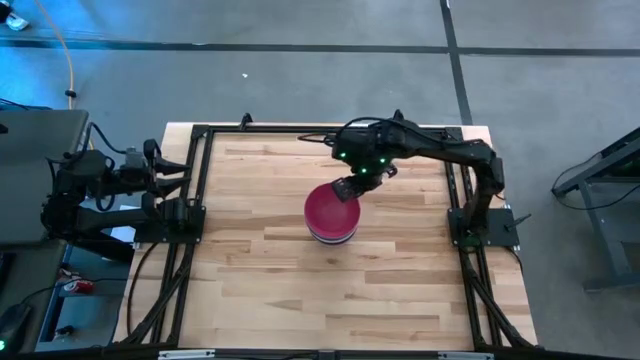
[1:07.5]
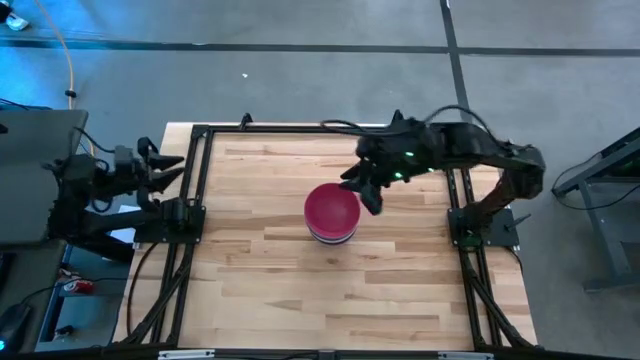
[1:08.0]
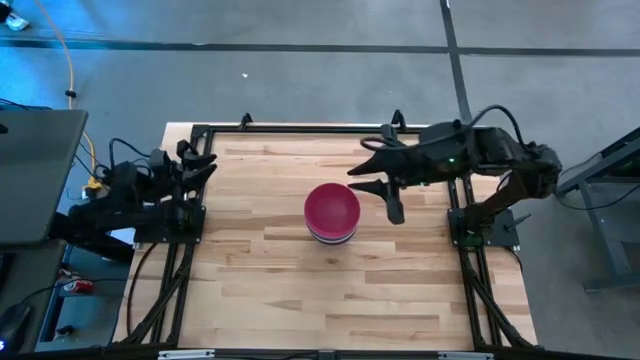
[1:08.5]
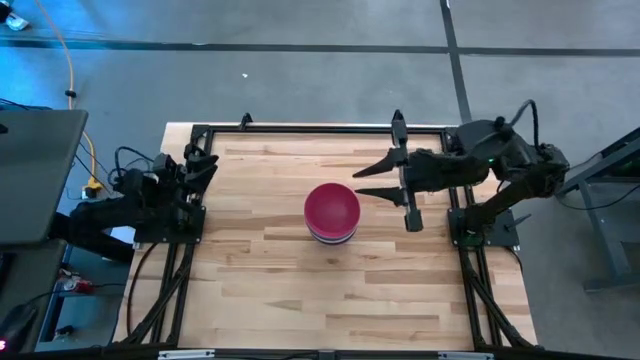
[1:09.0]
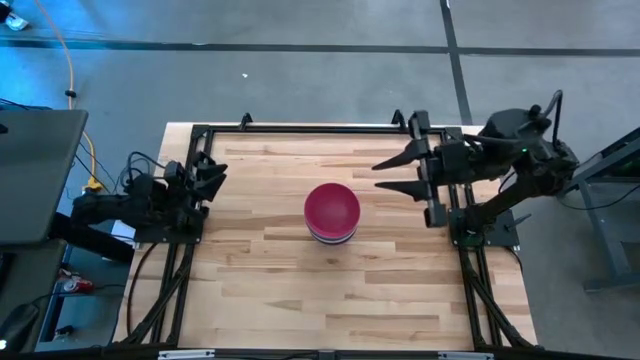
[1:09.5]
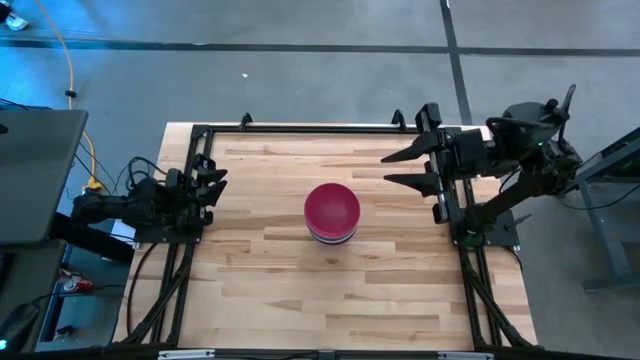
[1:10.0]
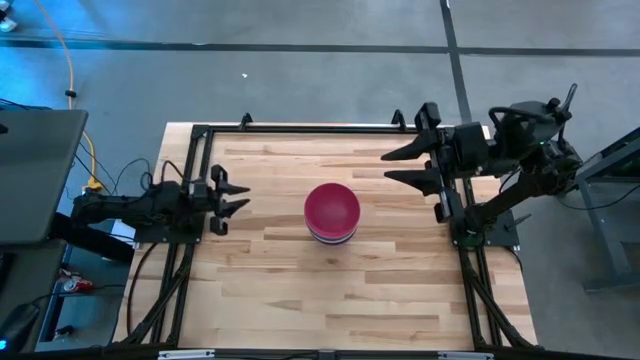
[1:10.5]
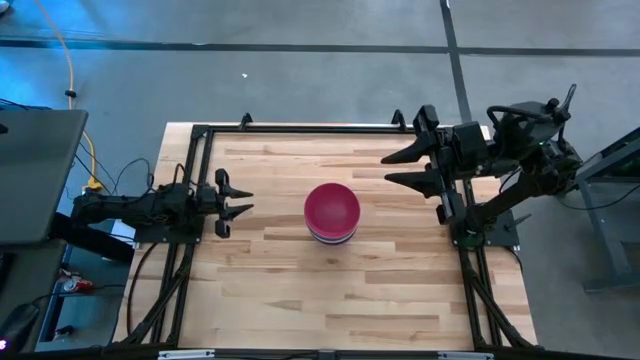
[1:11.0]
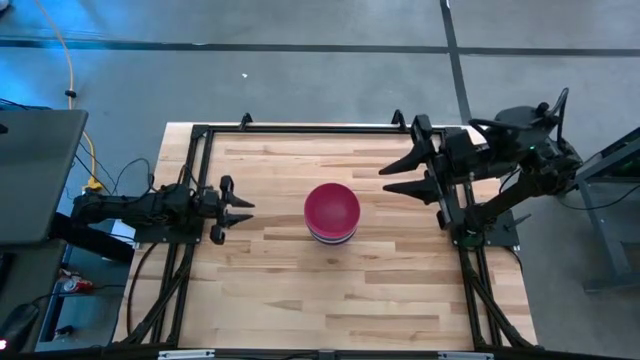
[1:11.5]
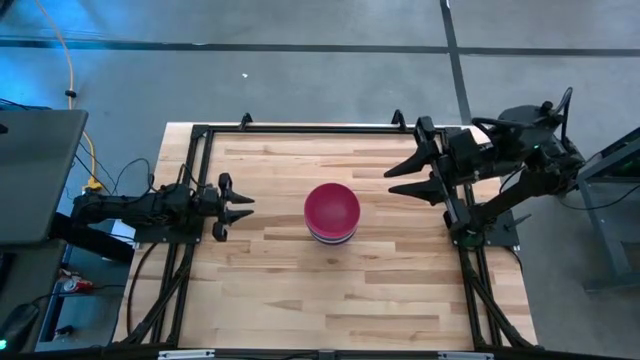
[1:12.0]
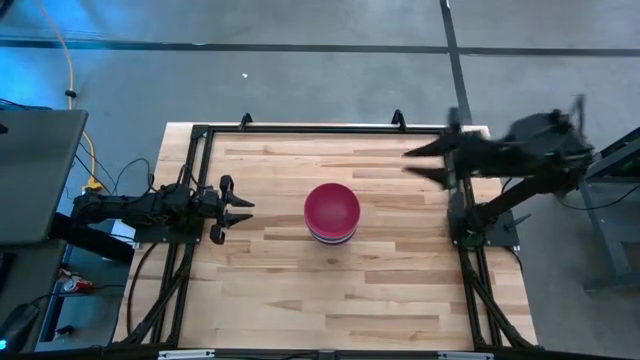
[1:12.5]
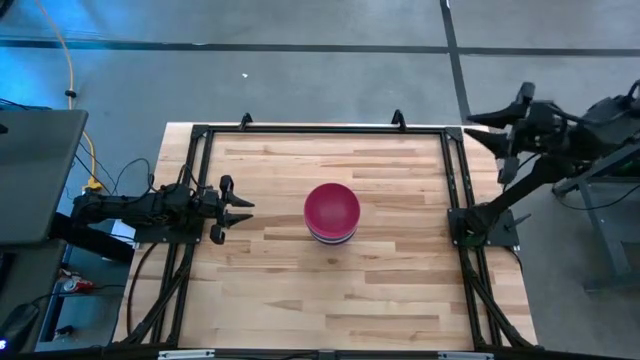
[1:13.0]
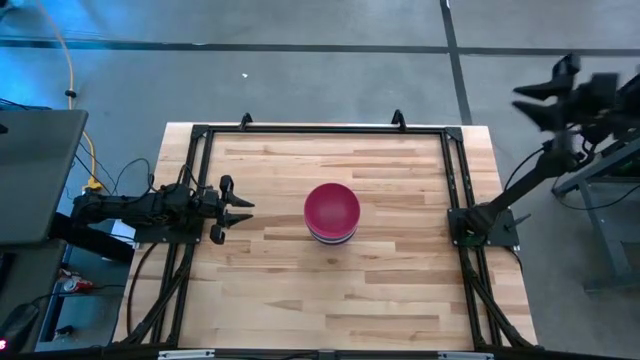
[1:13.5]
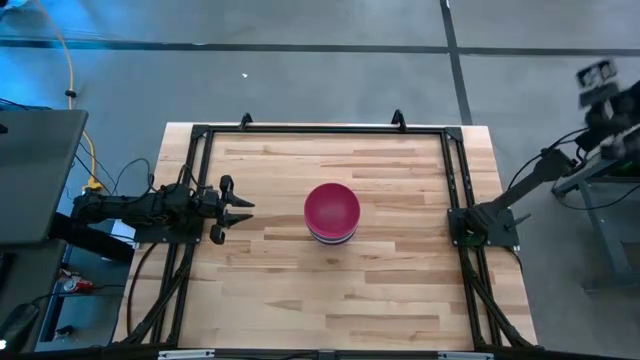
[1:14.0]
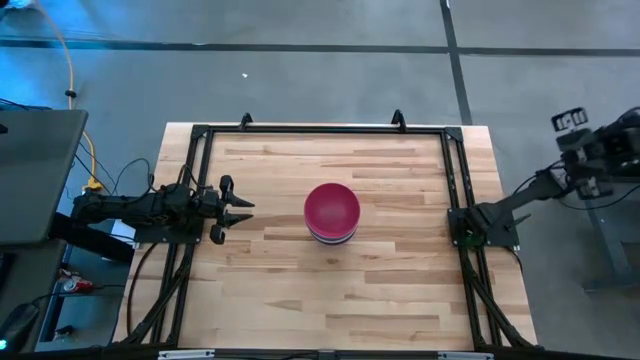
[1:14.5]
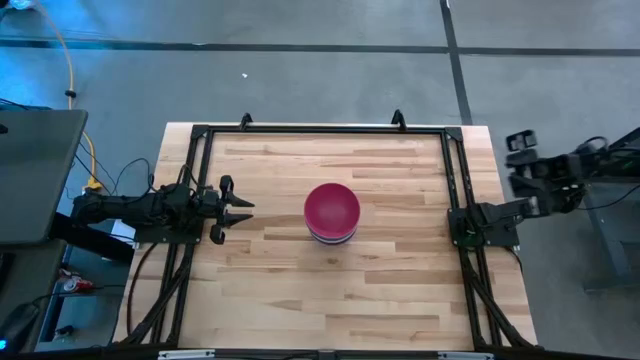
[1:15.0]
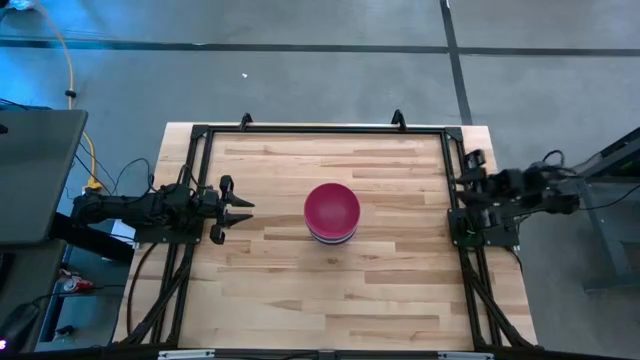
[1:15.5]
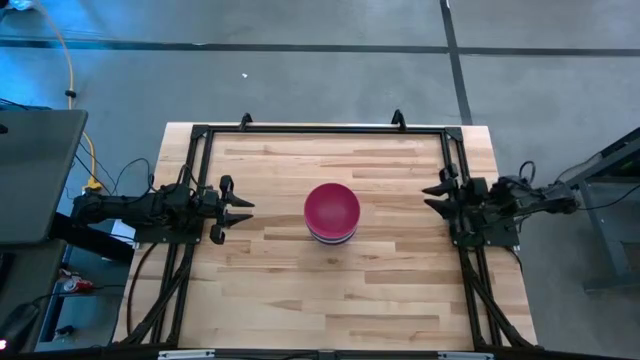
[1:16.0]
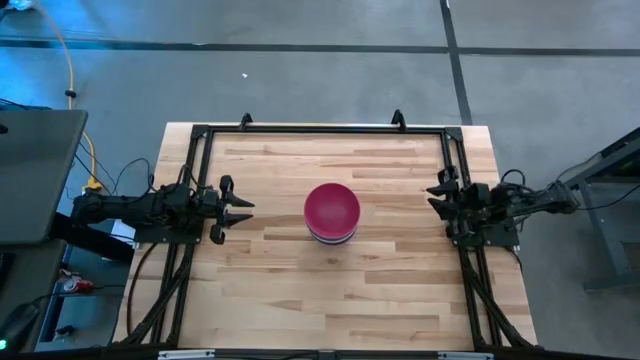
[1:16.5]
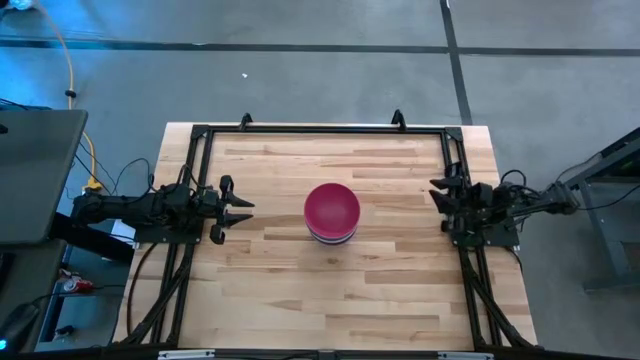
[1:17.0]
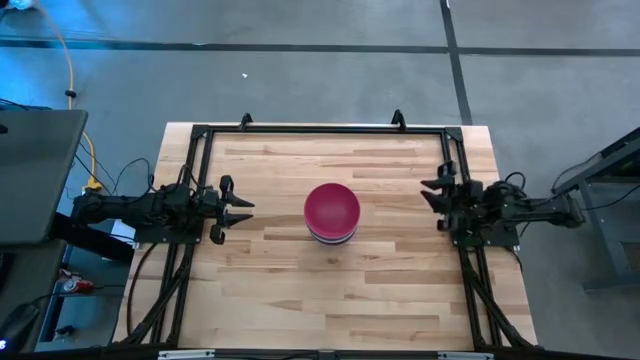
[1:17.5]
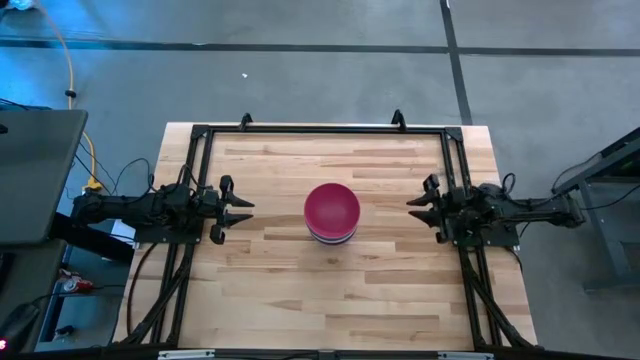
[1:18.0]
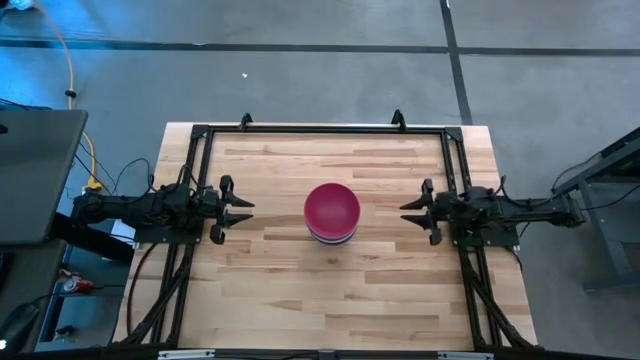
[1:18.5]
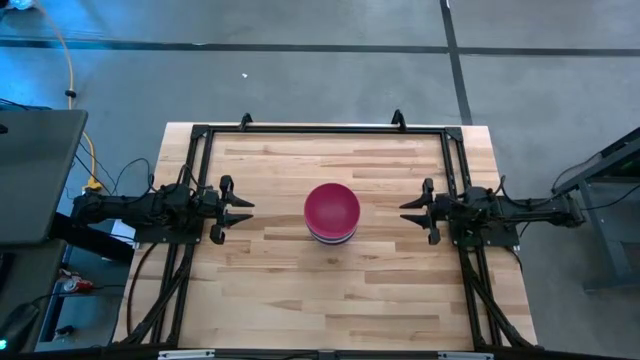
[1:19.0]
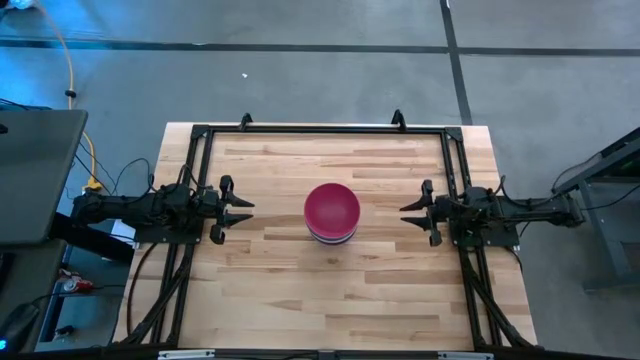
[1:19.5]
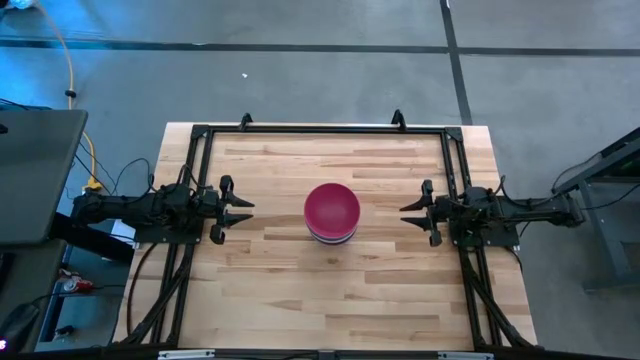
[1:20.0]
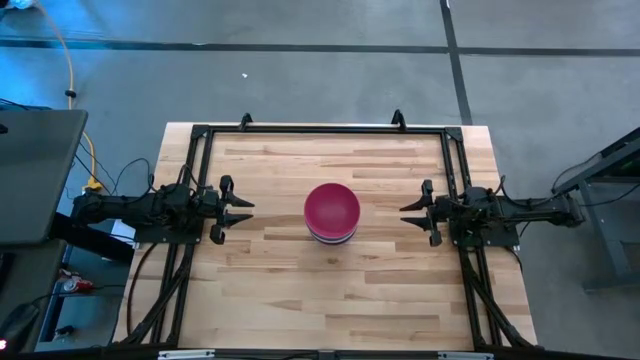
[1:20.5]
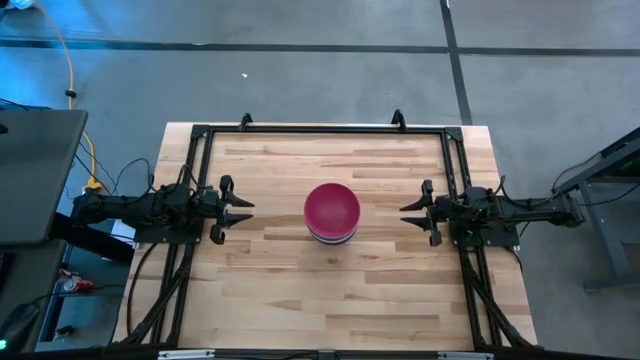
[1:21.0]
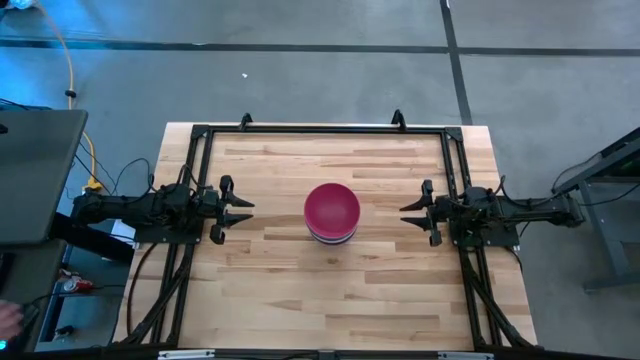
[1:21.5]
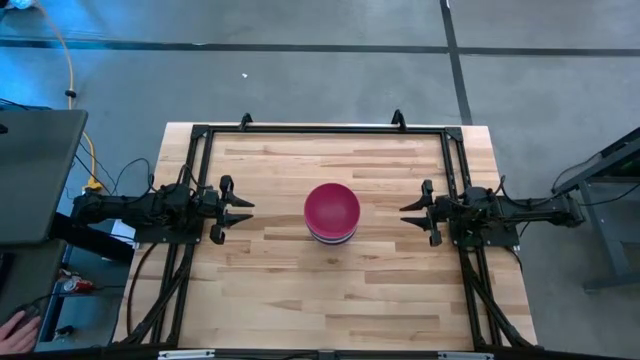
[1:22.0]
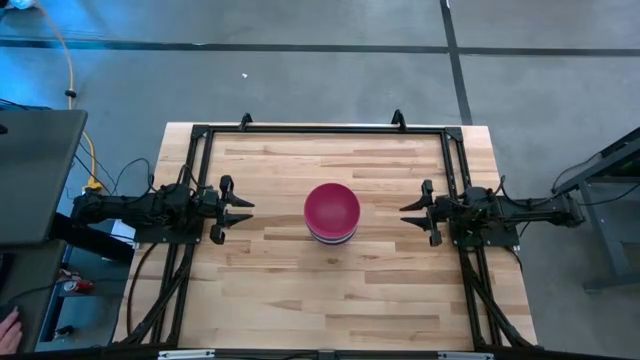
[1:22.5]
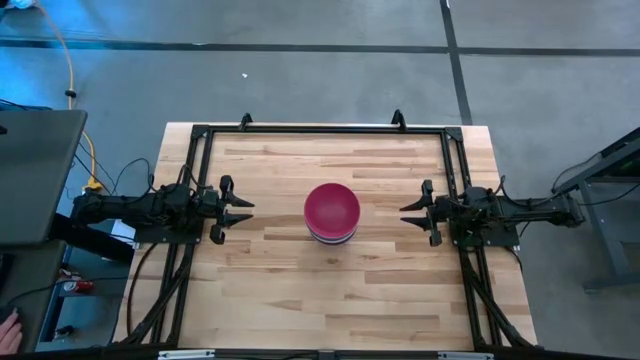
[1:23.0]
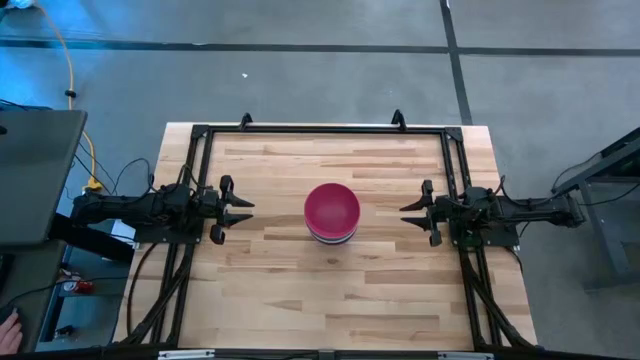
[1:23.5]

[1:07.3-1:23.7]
Task: Nest bowls inside each other
Return to Home Position

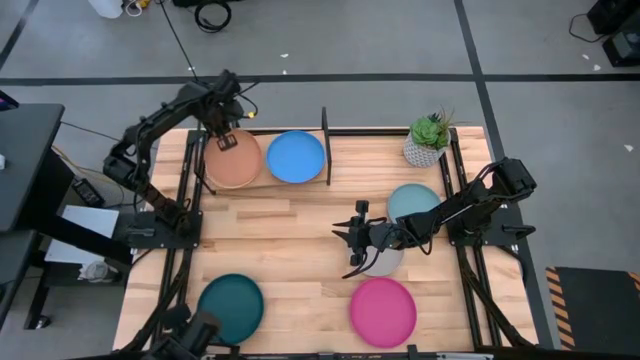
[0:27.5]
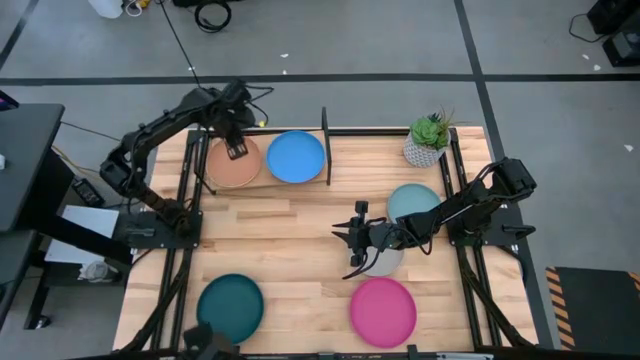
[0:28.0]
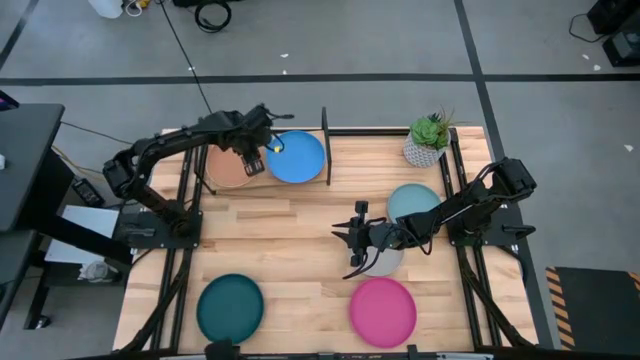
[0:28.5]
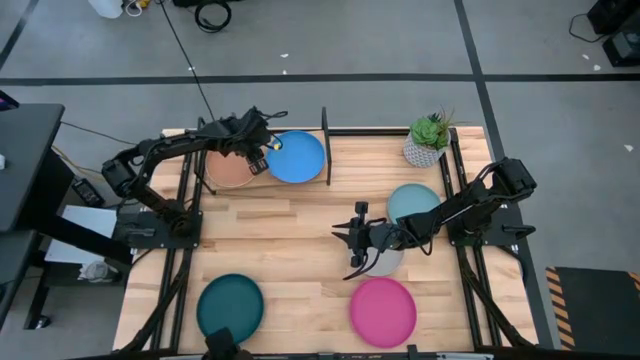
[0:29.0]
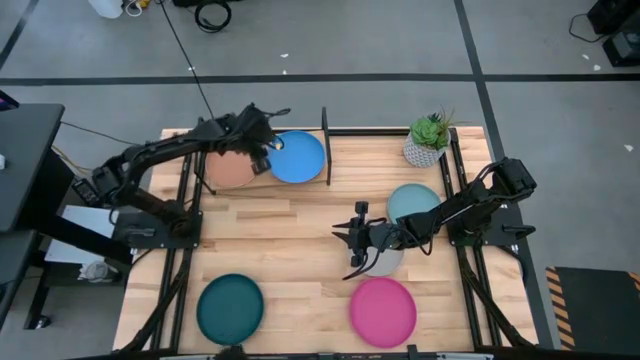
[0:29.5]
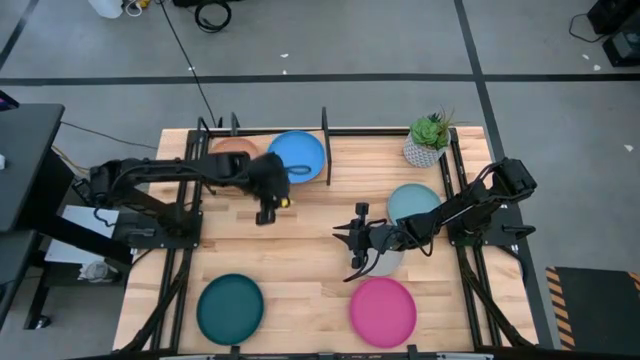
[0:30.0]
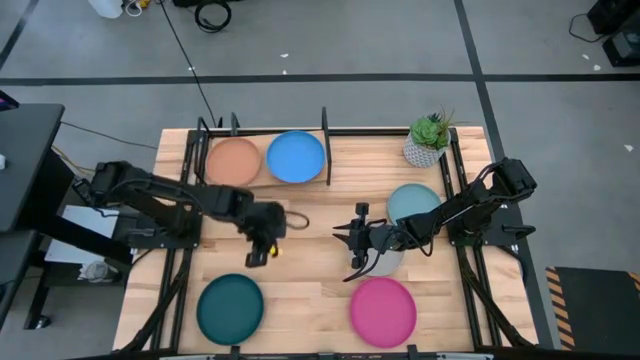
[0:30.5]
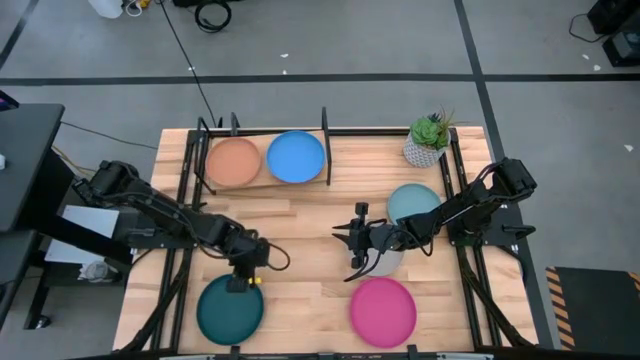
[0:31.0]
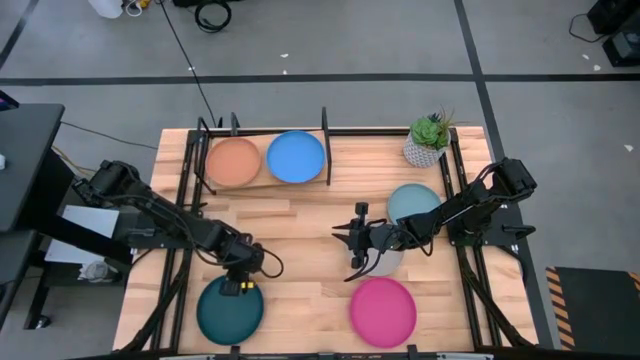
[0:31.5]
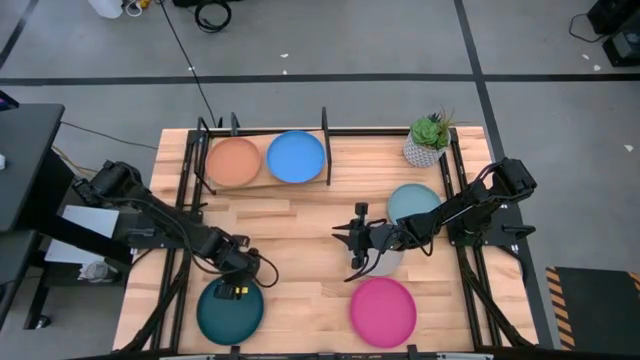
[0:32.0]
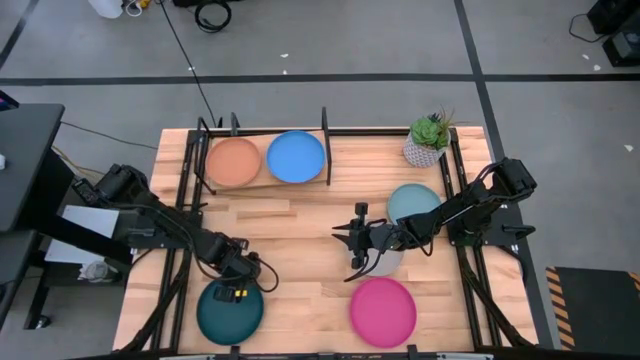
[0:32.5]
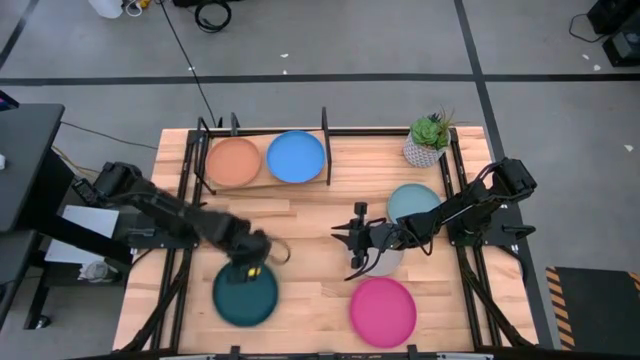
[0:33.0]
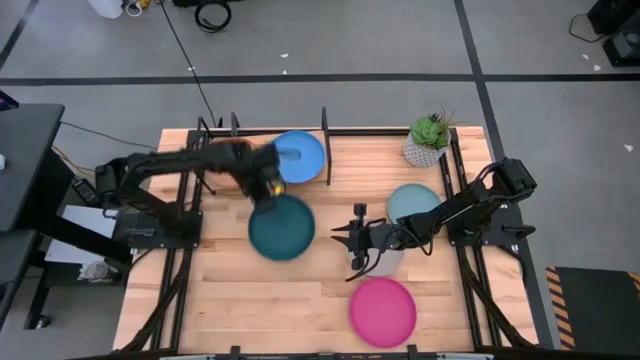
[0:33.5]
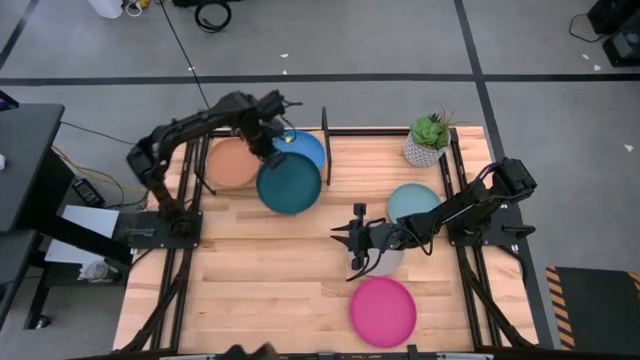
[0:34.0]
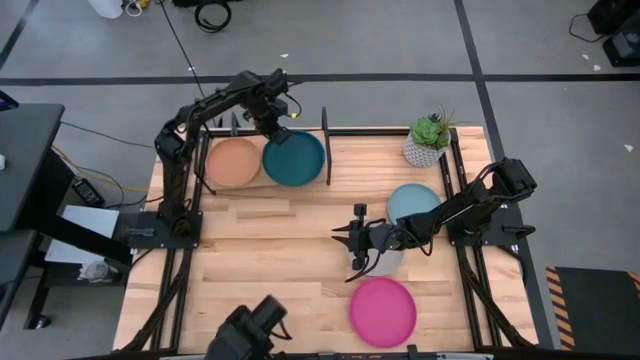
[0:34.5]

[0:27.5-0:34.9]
Task: Place and stack plates onto a shelf
Stack the dark green plate on the blue plate
